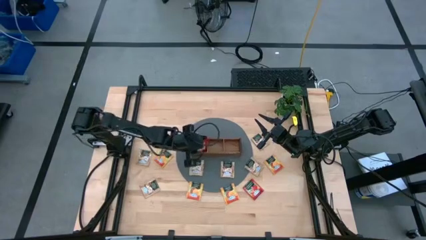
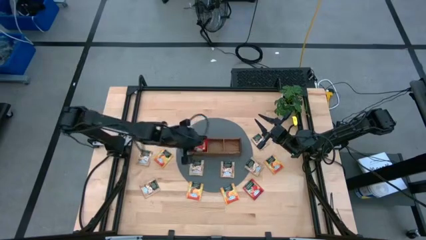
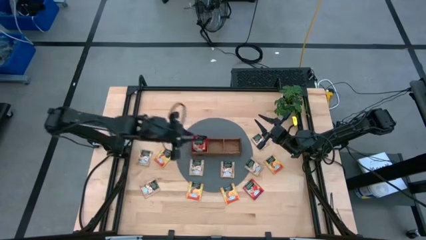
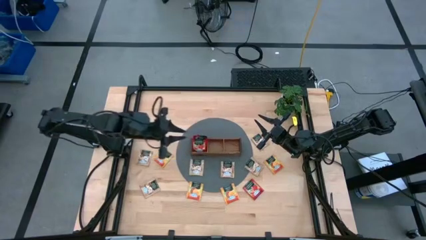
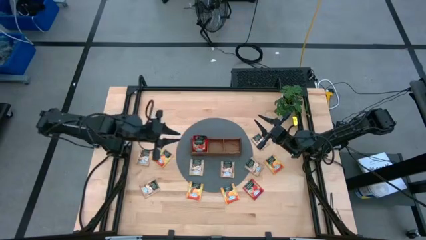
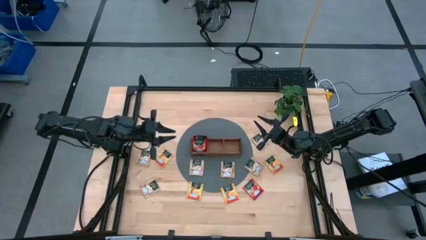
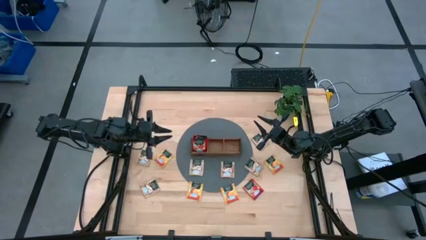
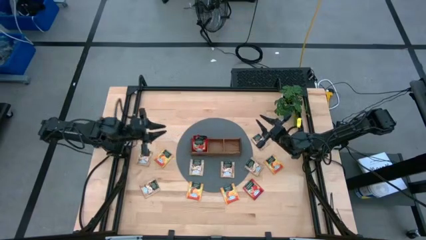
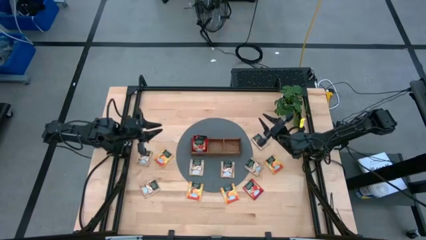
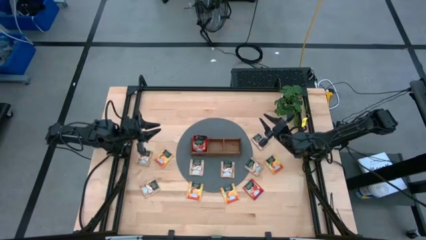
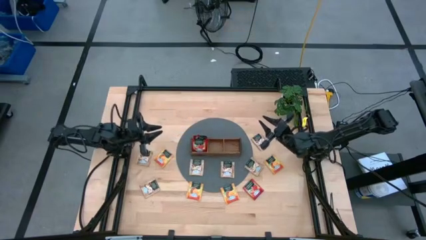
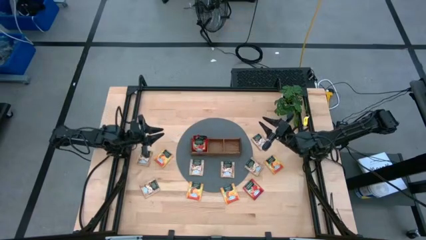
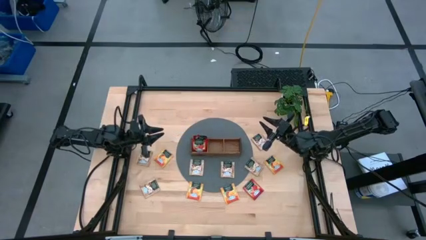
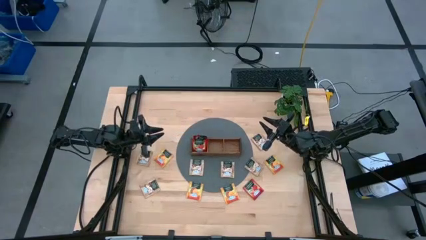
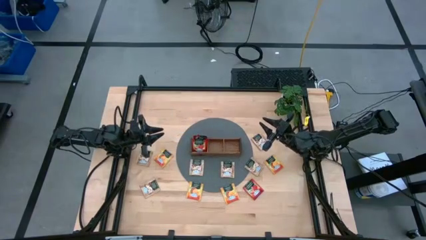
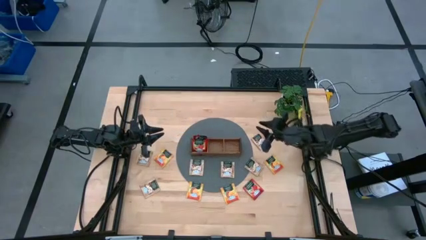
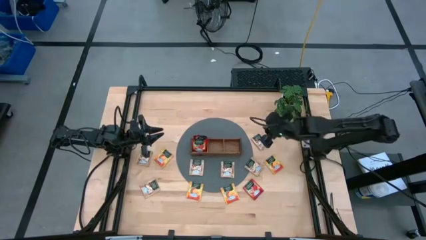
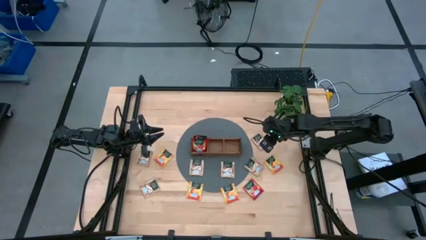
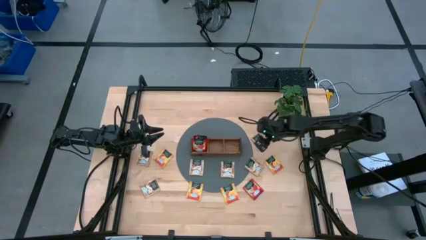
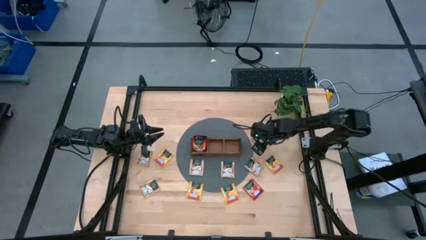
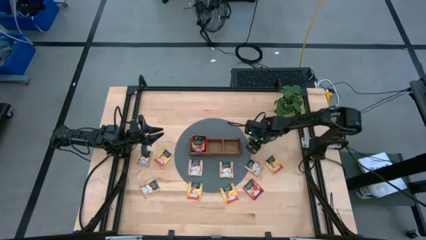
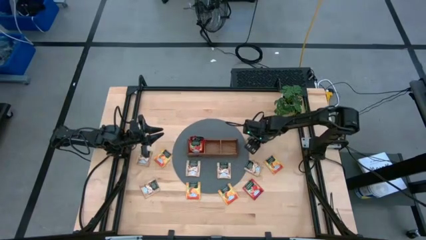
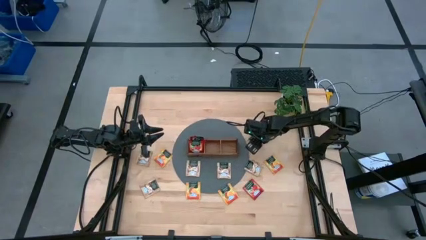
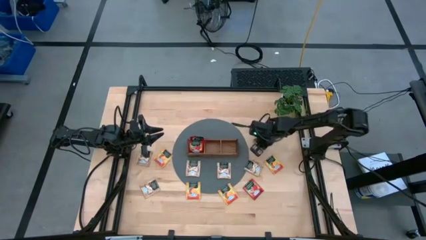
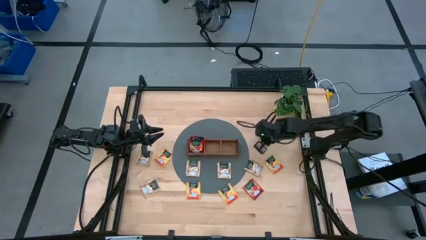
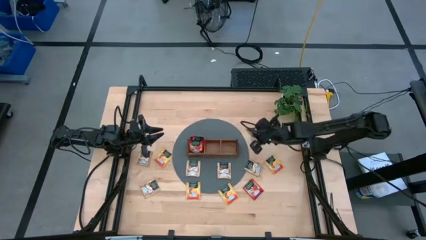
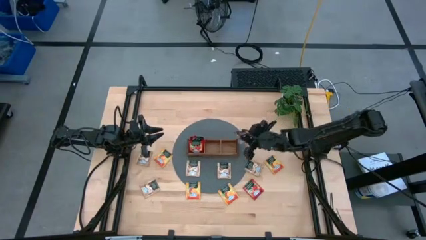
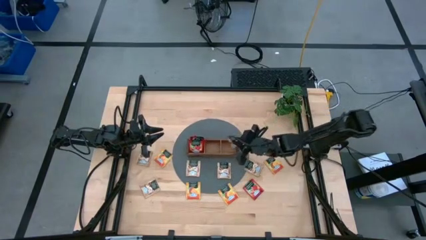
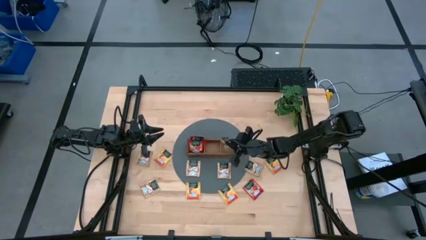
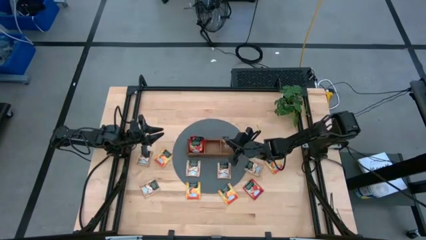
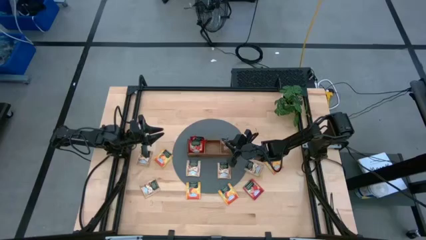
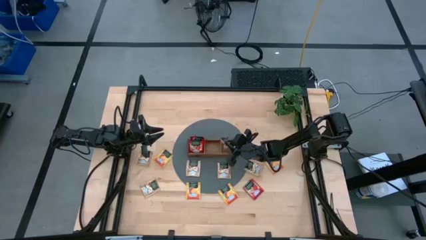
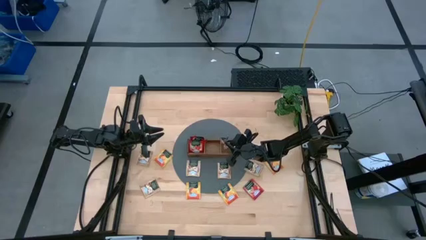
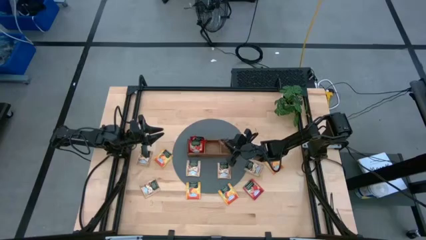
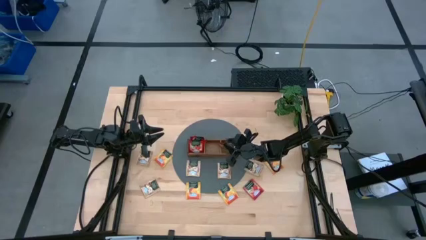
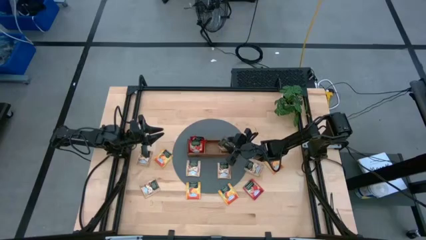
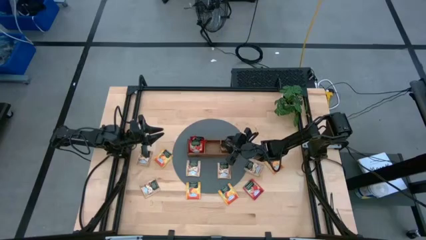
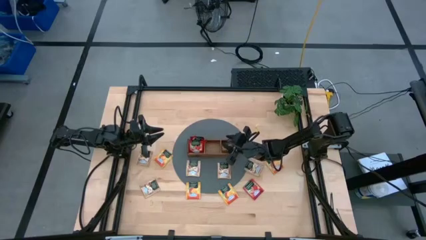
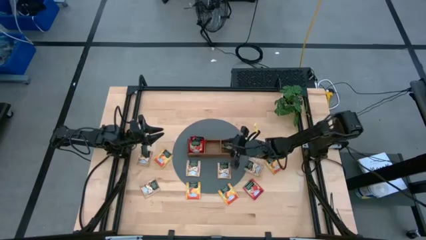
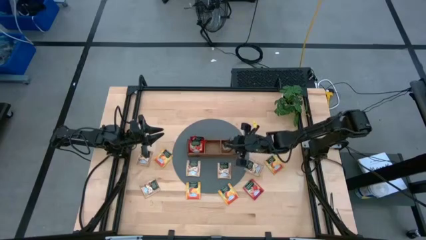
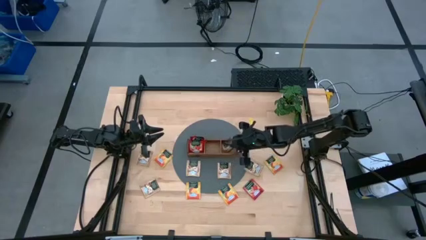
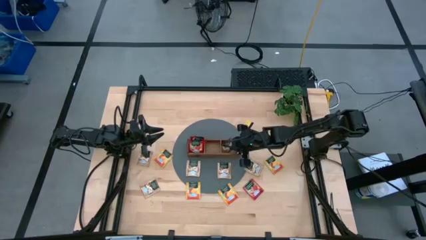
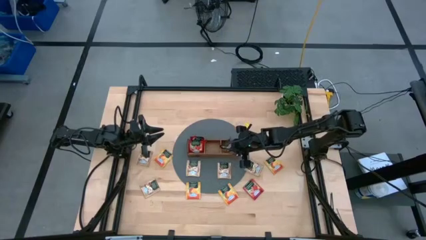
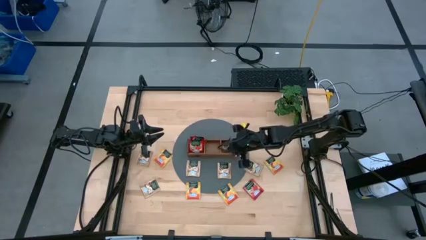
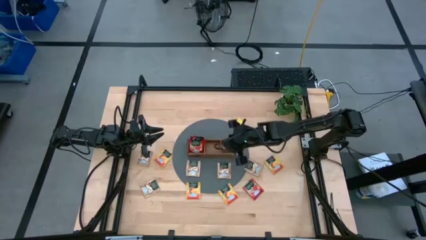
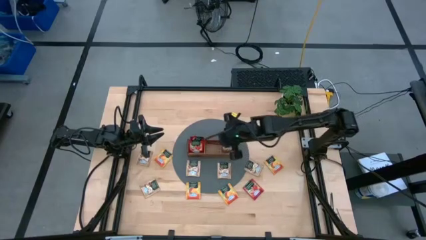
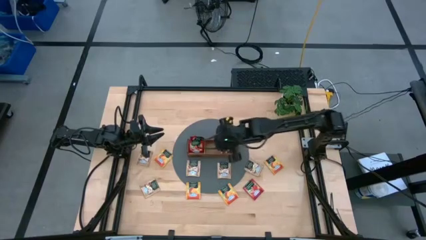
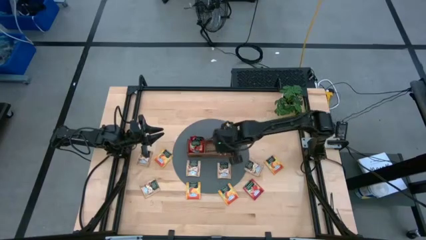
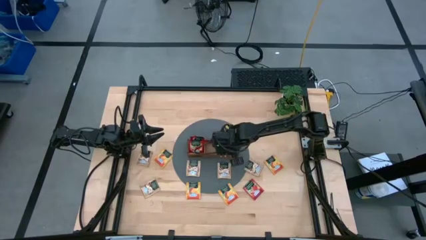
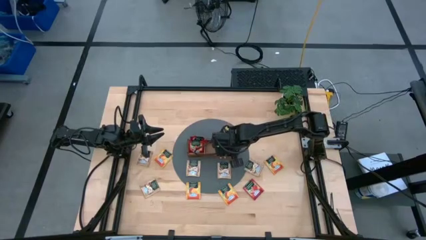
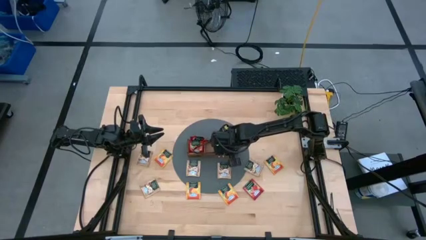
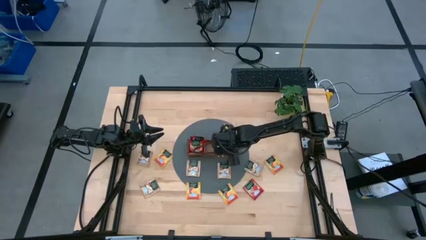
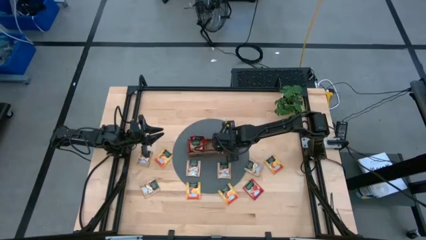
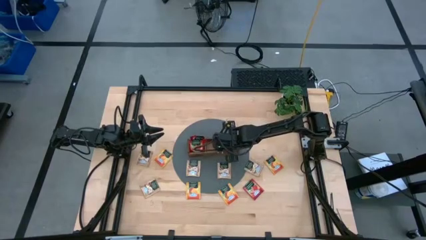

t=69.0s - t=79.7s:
Task: Pick & Place Tea
Put the yellow tea bag into the right section of the wooden organizer

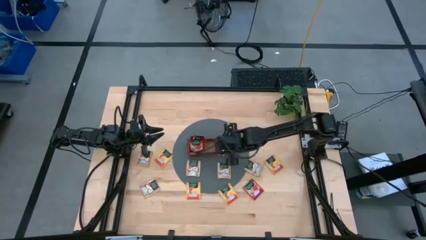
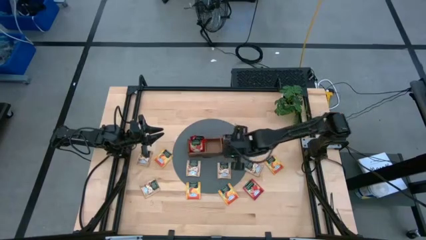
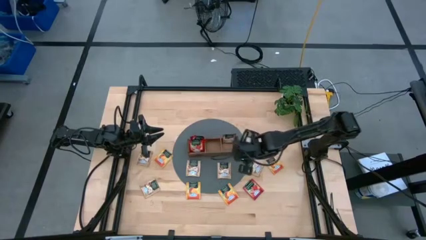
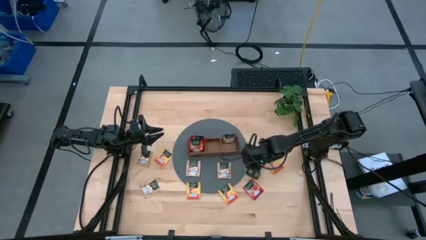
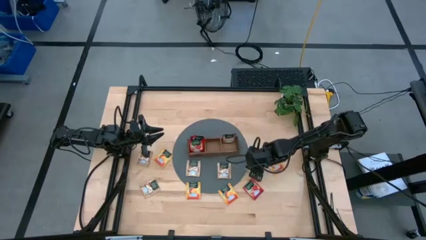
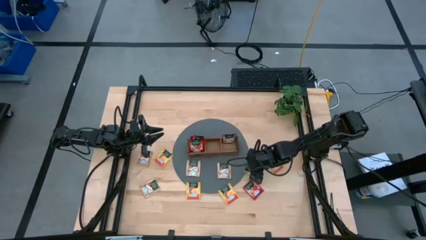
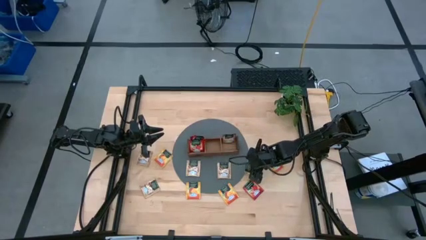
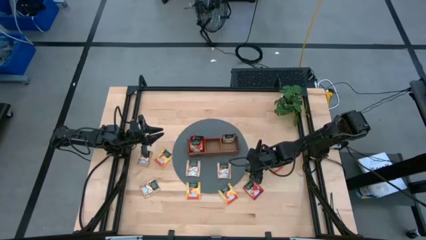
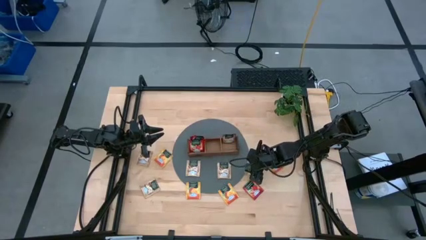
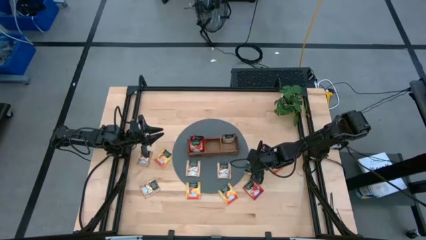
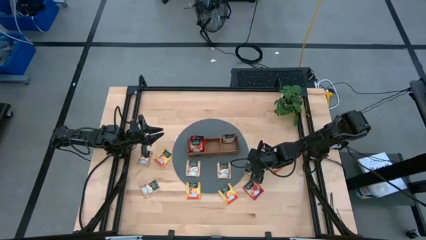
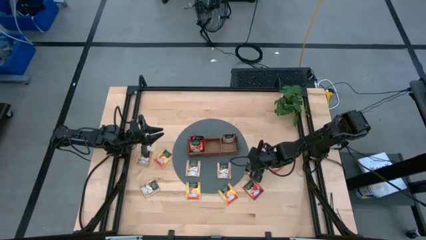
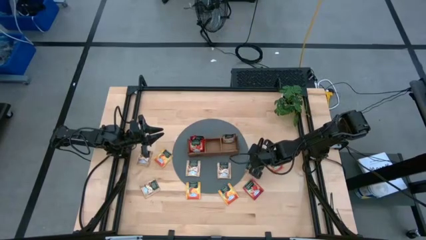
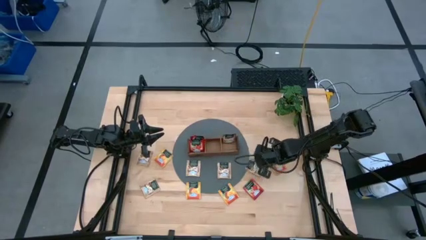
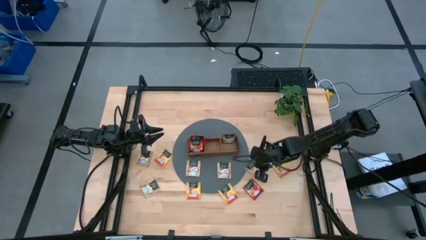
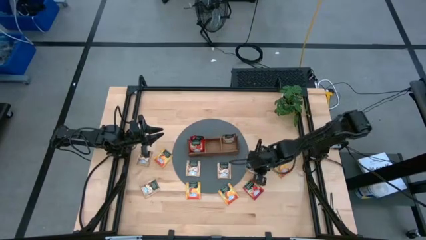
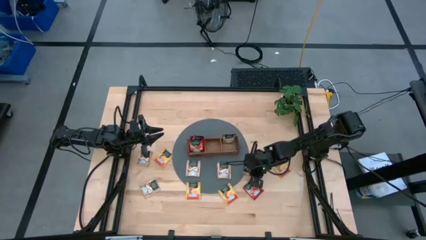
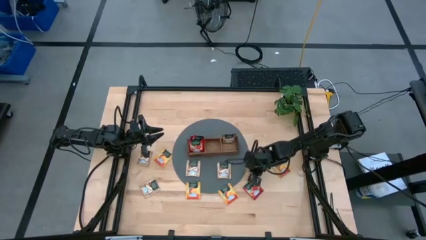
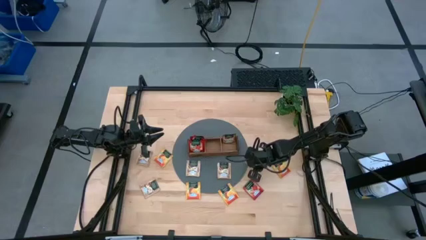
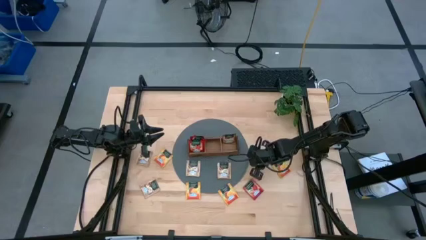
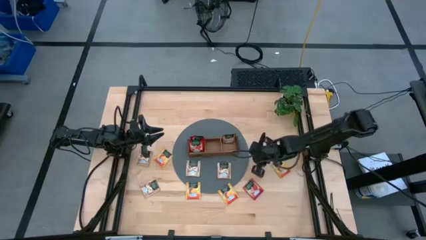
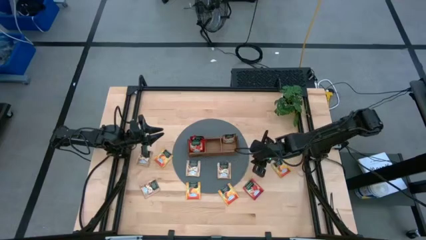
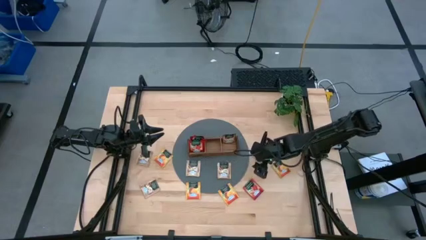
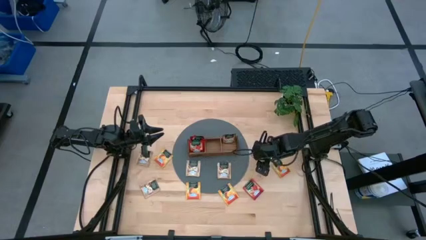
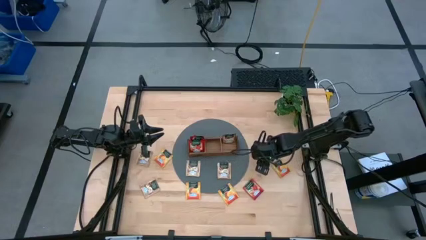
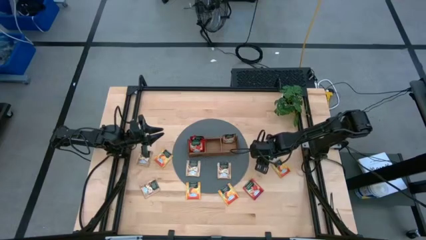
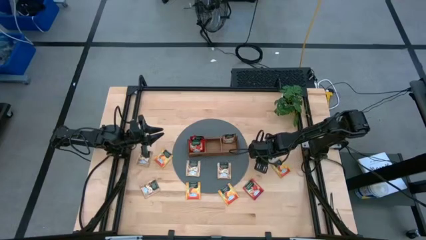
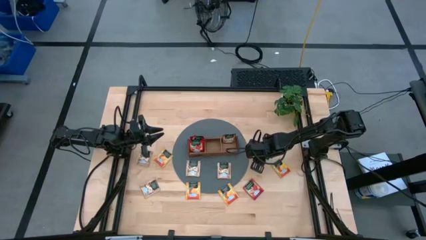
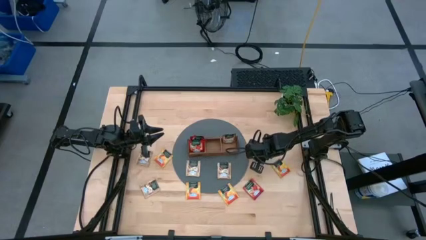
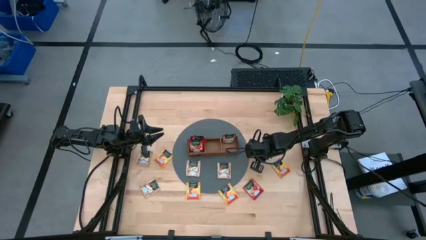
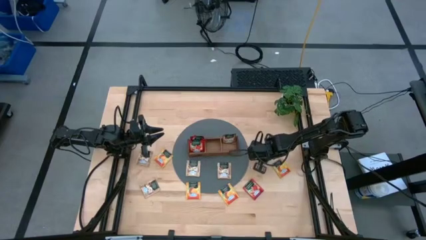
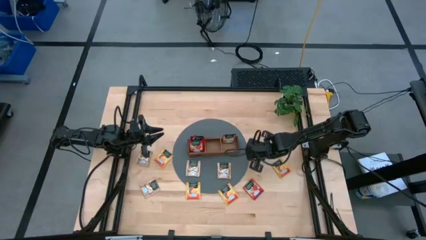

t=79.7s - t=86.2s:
Put the yellow tea bag into the right section of the wooden organizer
